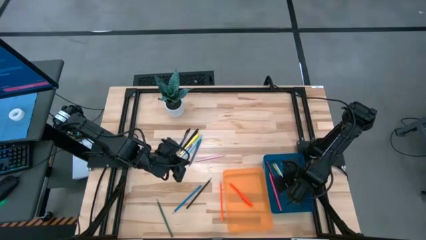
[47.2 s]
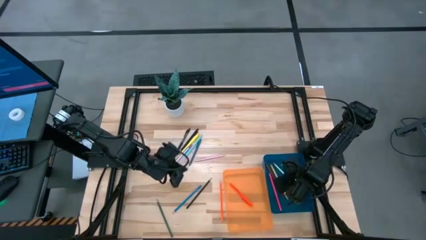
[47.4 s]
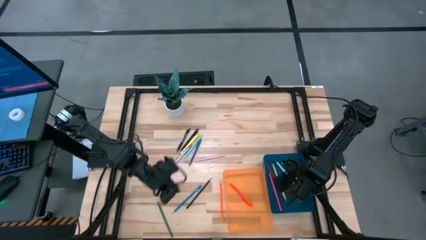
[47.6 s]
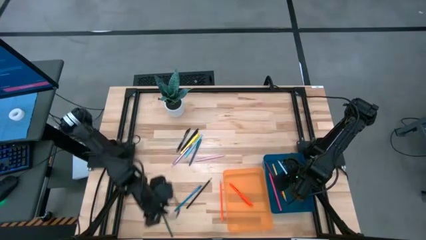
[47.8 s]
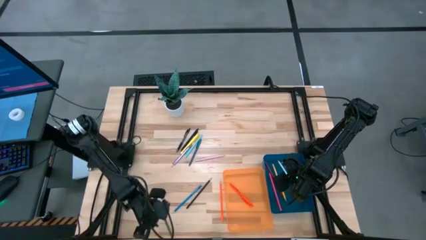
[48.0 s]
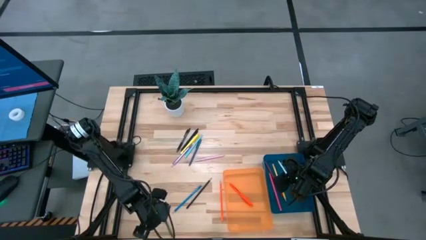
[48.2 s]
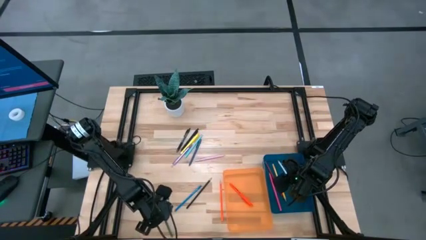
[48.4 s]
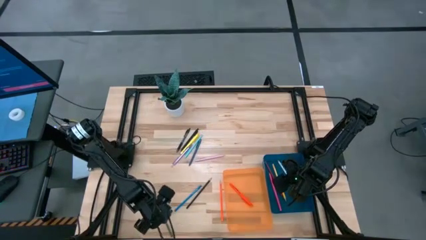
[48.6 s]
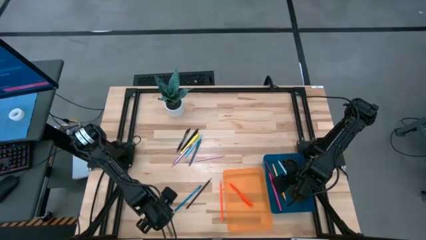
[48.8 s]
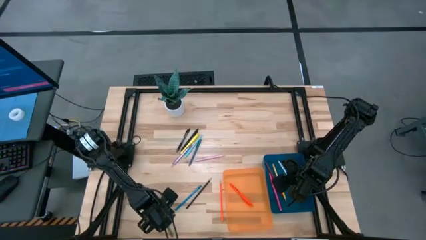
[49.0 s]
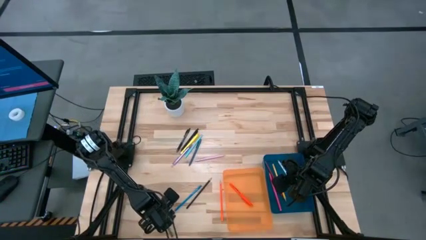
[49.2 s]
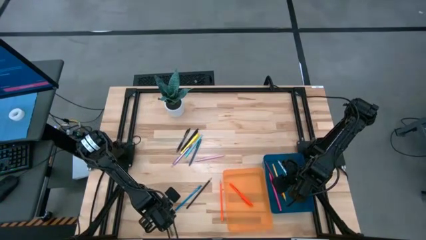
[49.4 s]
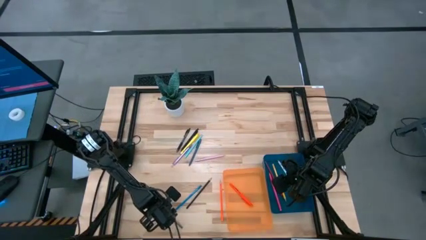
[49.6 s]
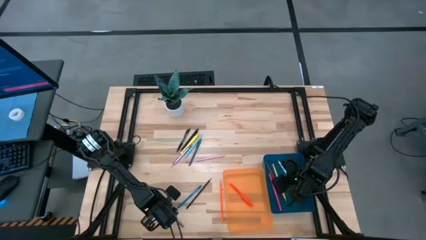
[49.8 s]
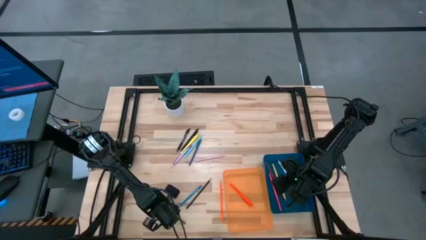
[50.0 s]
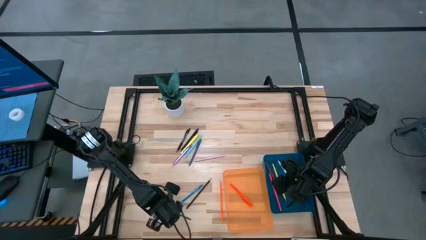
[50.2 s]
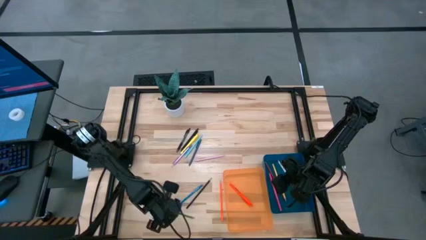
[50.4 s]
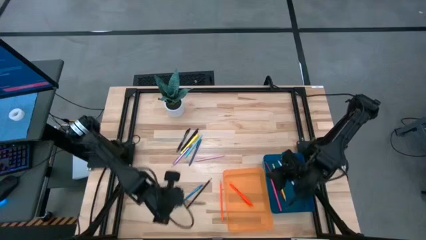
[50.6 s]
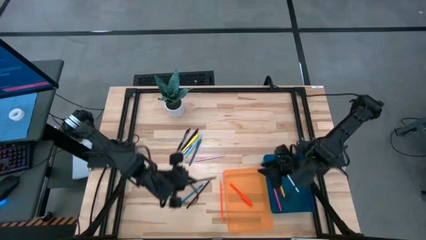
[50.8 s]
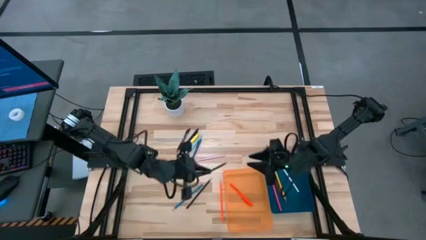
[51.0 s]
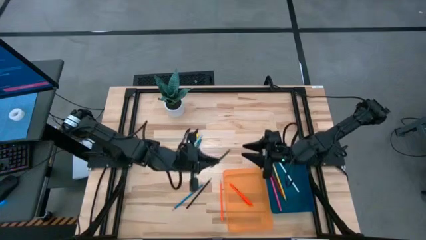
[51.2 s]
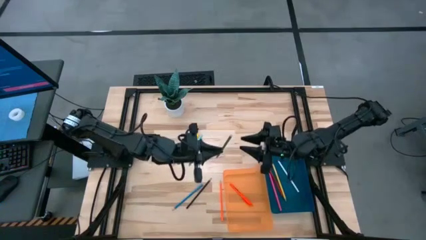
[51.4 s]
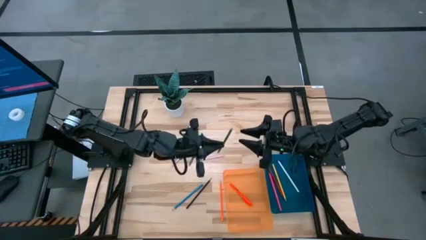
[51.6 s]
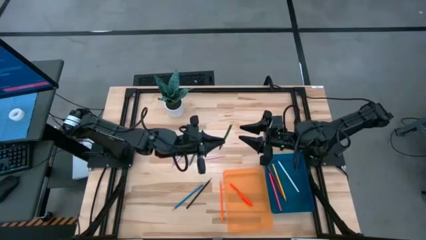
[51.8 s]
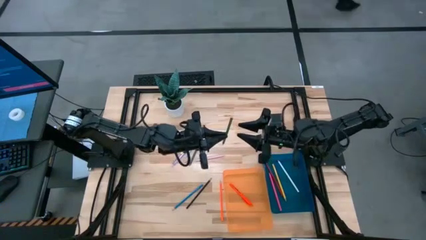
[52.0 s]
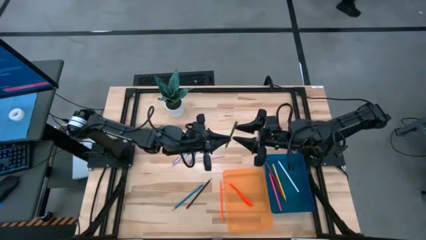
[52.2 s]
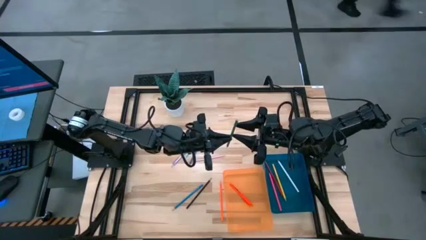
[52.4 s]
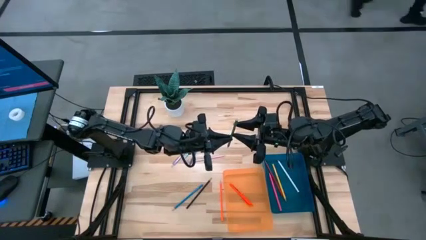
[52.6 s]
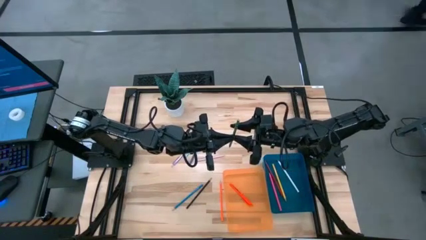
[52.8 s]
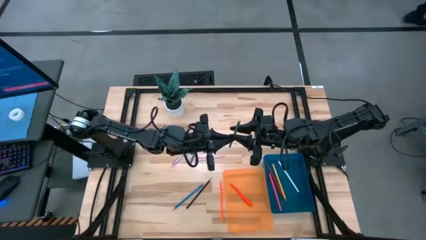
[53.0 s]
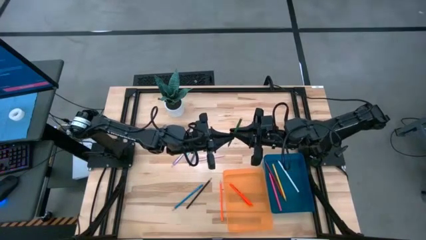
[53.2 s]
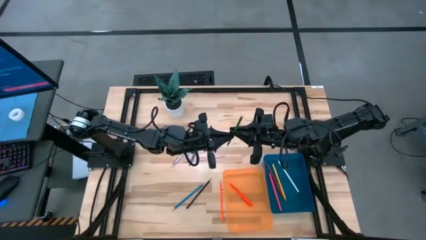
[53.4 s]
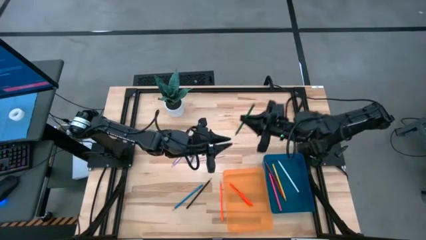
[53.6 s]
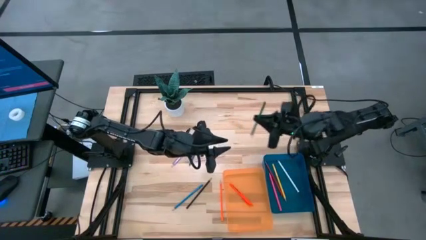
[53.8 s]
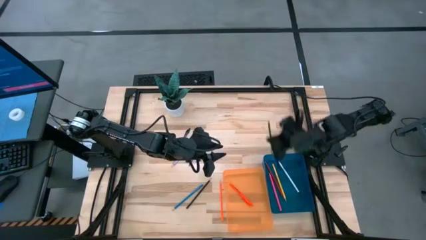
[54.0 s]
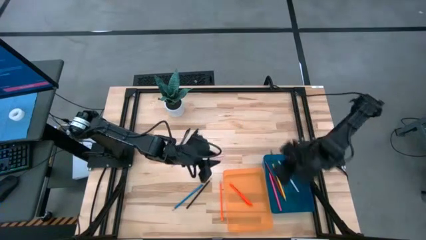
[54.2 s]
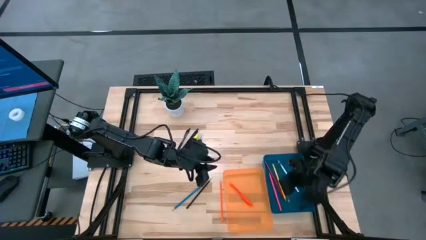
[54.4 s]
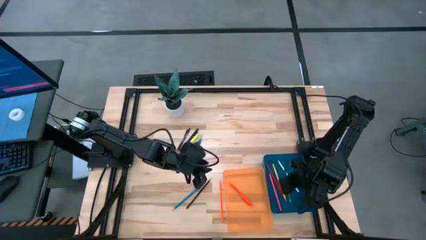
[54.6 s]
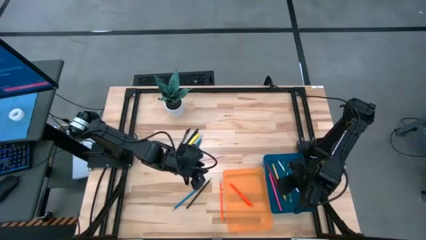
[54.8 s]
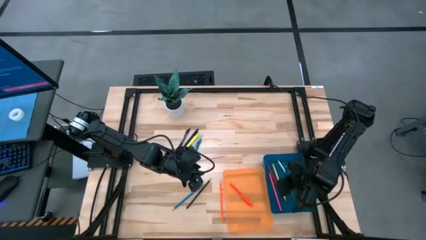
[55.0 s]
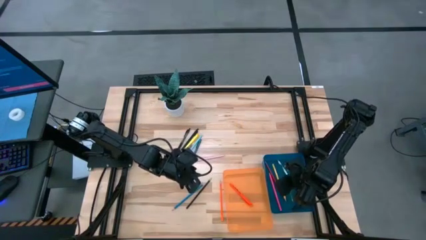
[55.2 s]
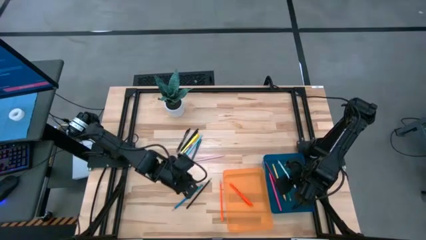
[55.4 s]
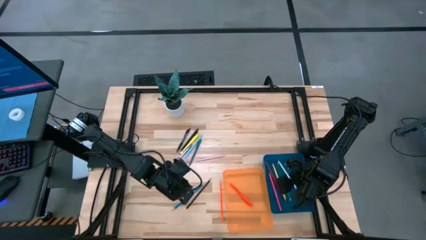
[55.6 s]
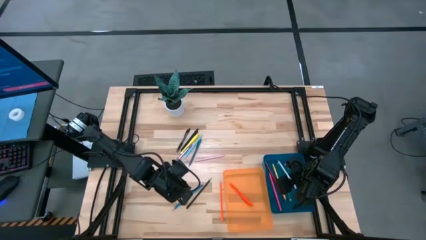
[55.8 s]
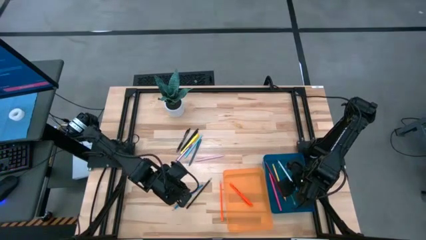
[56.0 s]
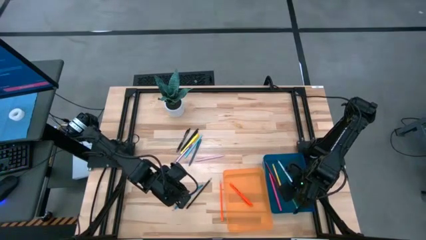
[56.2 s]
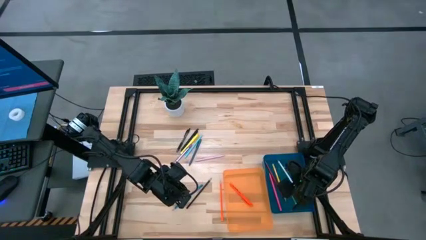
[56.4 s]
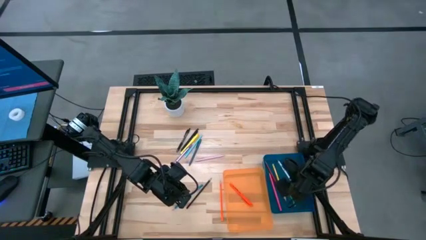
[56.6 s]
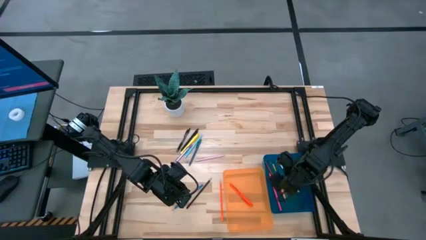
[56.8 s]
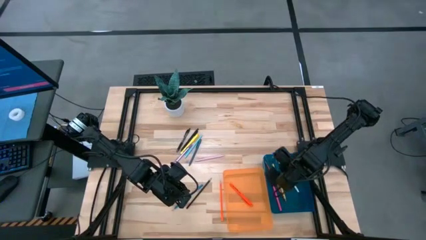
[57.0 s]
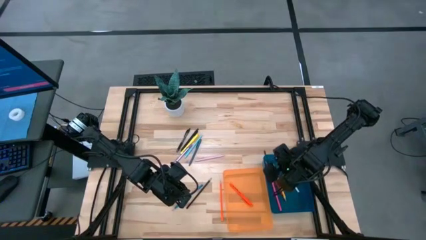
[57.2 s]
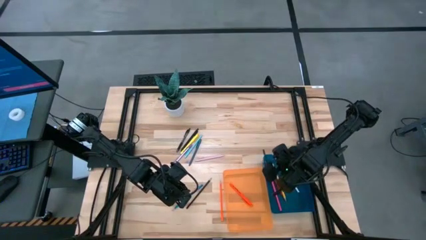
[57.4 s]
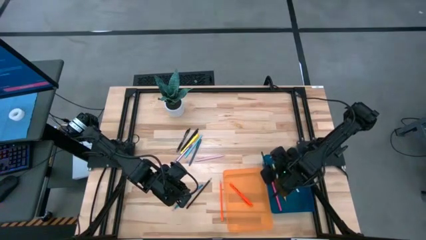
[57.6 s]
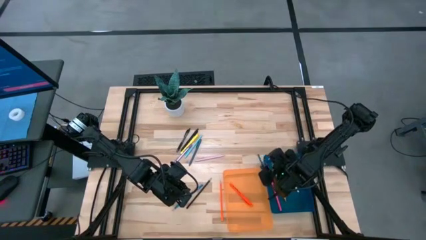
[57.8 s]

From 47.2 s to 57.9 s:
Task: Sort pens & pencils
Put the green pencil into the blue bin

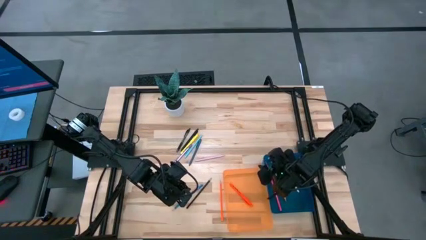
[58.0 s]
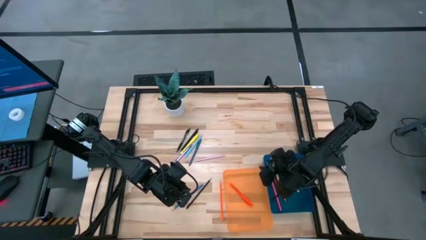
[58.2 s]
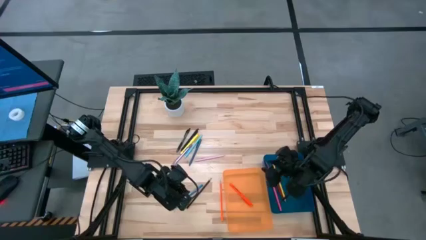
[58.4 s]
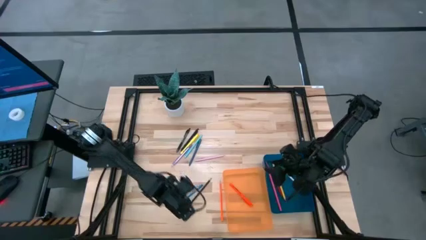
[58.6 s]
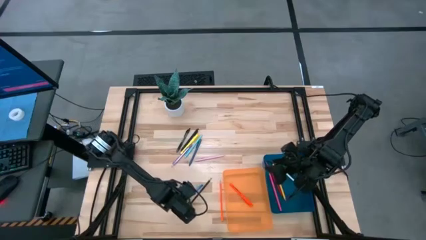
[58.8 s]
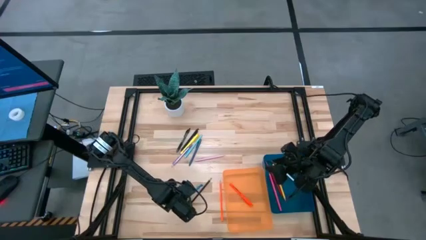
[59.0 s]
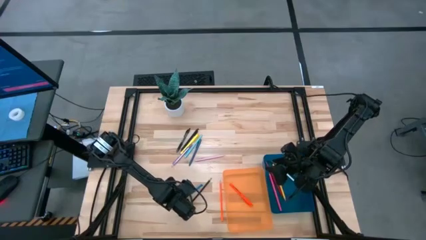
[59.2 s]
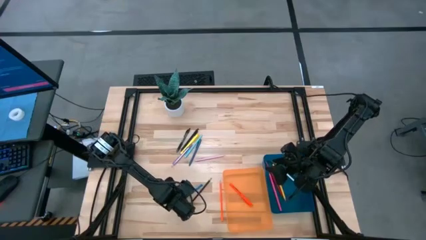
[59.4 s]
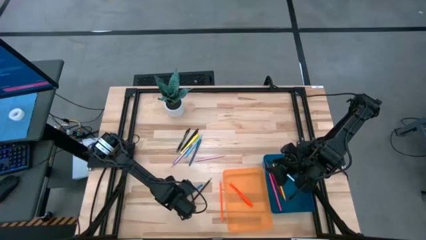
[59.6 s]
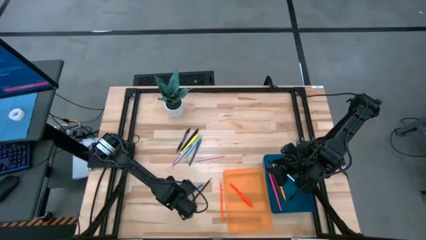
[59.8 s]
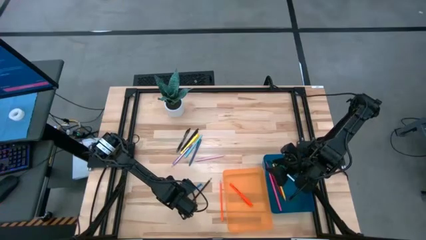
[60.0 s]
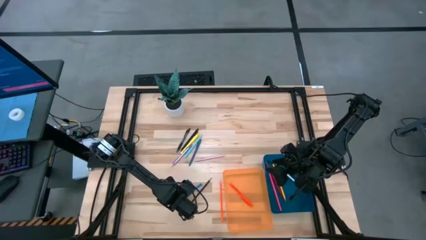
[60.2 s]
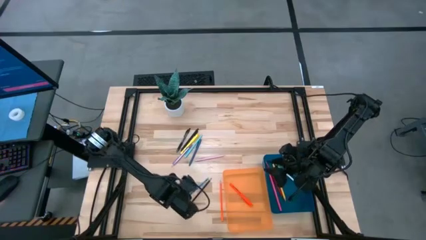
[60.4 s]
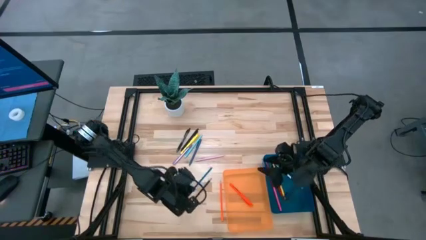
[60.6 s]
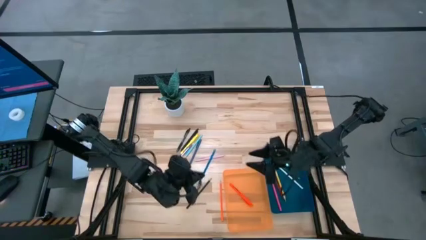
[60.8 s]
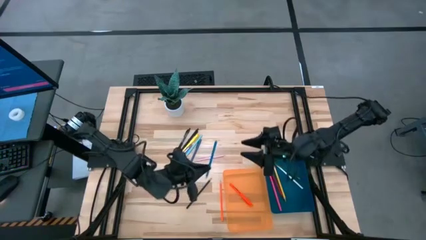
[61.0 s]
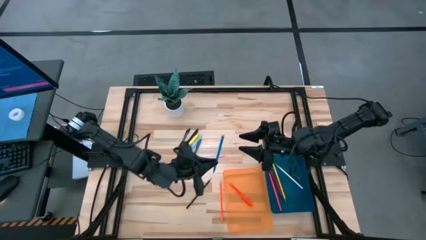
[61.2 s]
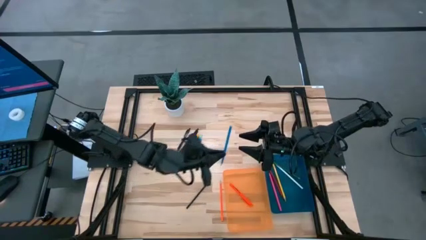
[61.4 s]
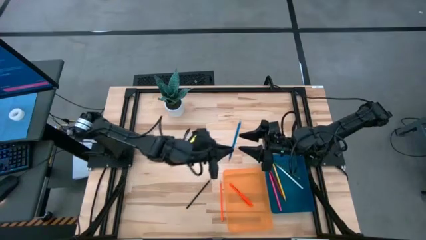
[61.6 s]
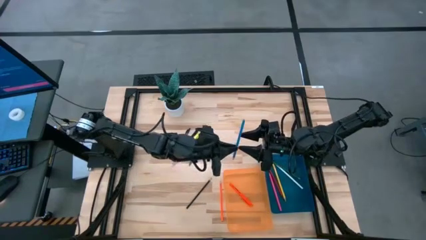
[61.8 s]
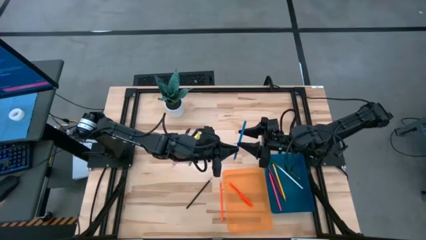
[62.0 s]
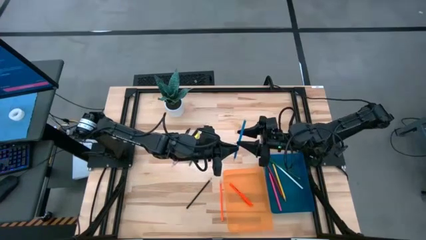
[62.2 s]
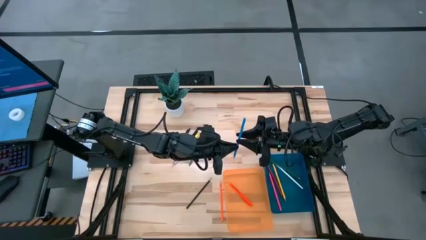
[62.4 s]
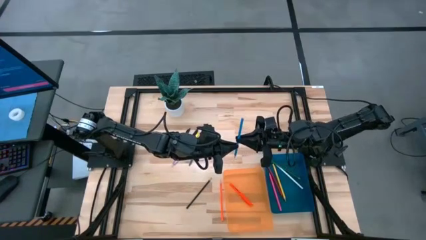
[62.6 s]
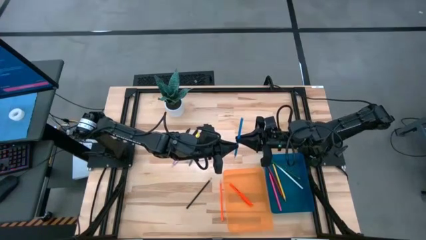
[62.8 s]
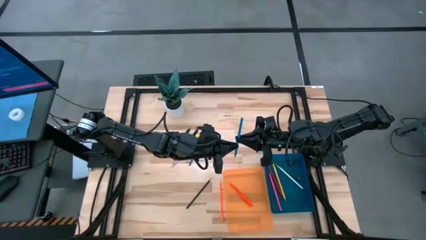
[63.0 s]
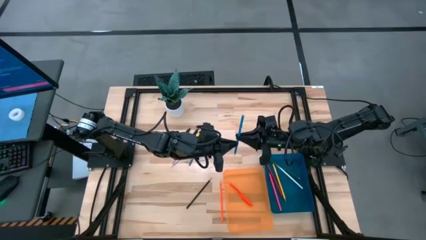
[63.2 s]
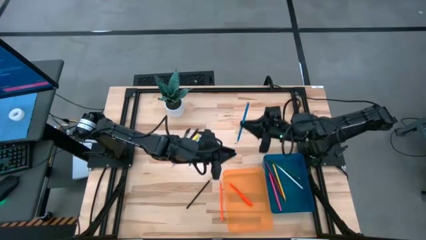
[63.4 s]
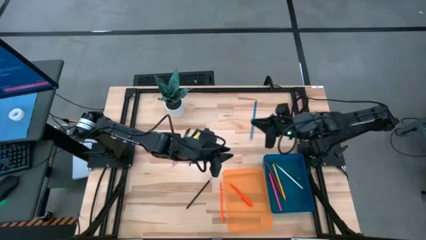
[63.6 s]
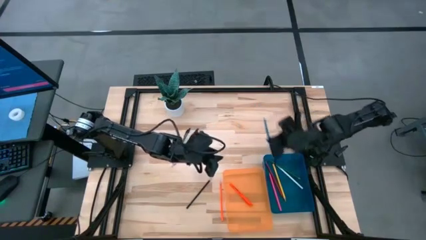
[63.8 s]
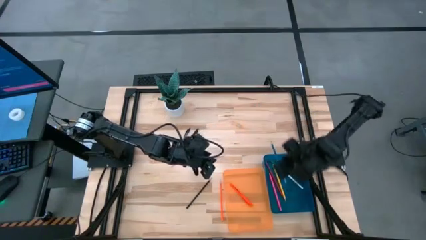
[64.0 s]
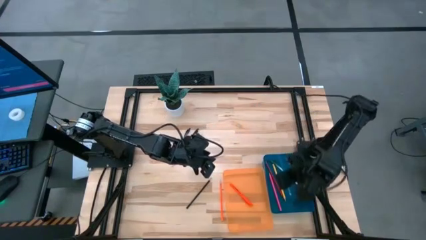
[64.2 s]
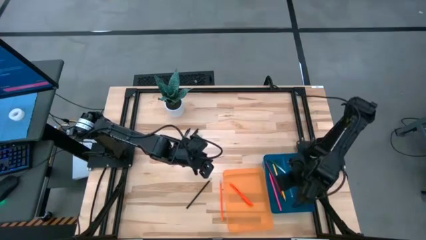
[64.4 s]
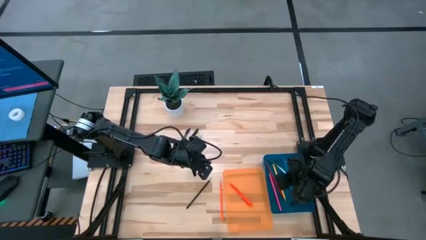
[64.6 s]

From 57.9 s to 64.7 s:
Put the blue pencil into the blue bin
